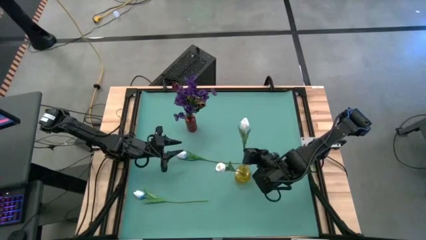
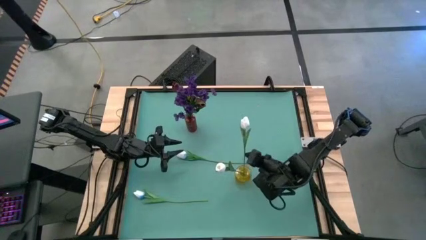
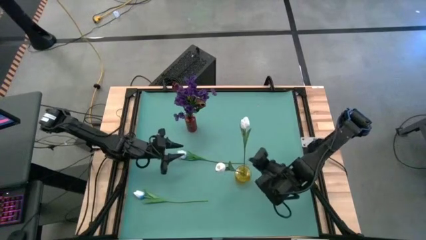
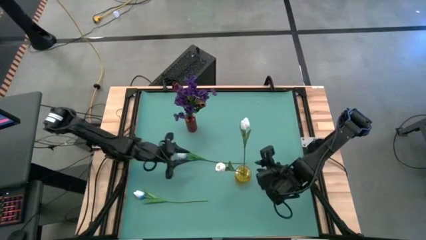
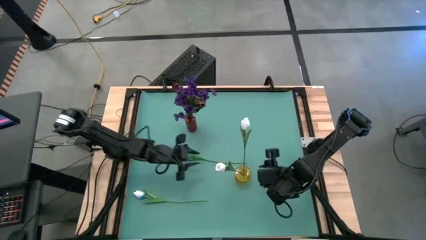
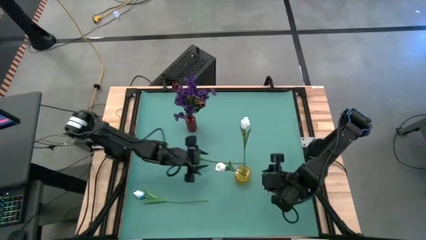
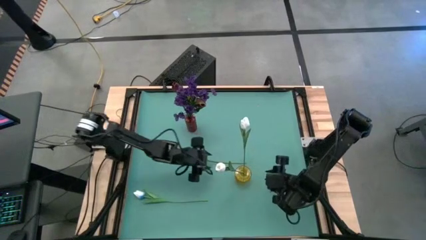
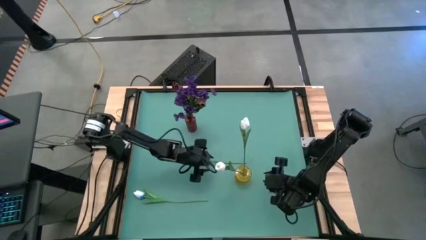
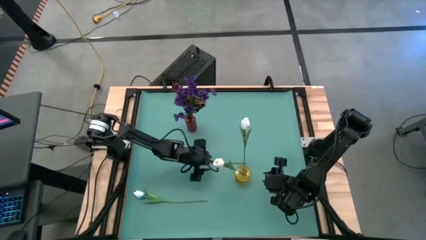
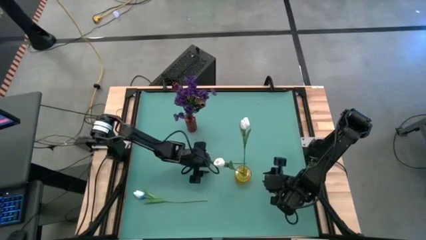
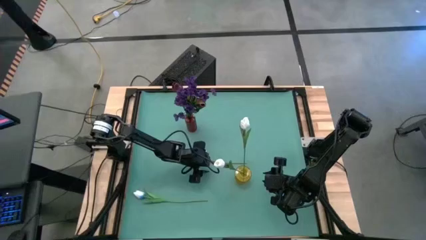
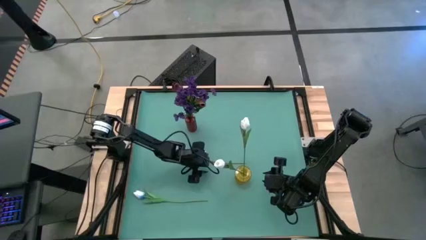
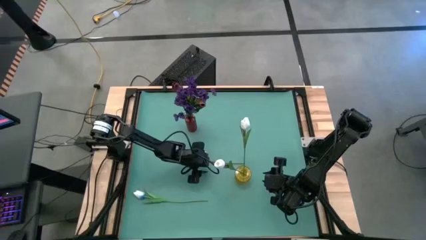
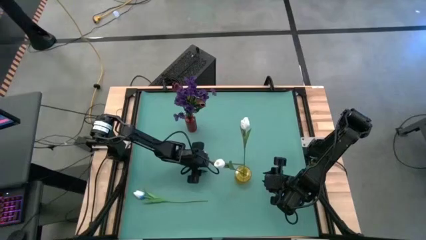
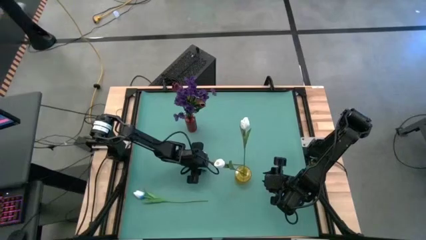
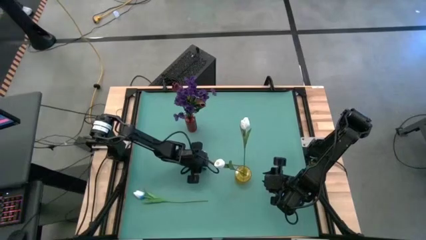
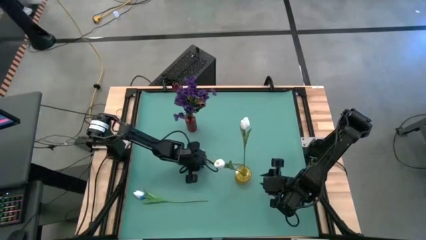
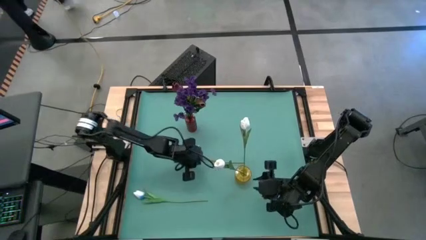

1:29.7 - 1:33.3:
Task: Sort flowers into vase by color
Put the top white-blue flower into the yellow flower vase

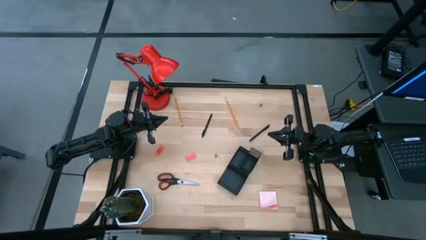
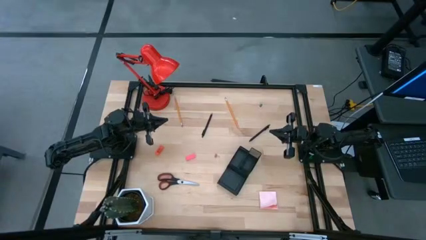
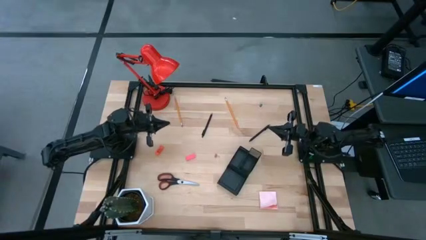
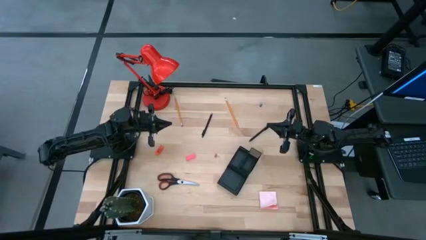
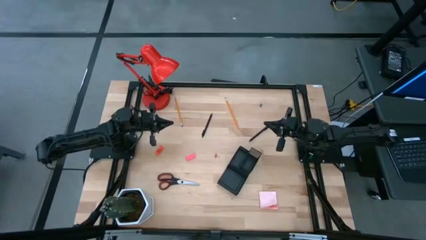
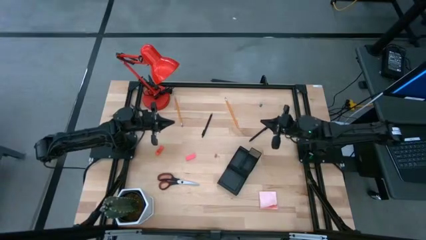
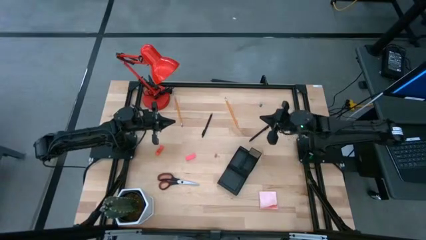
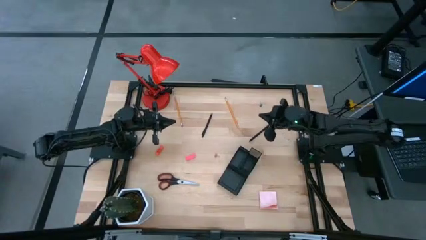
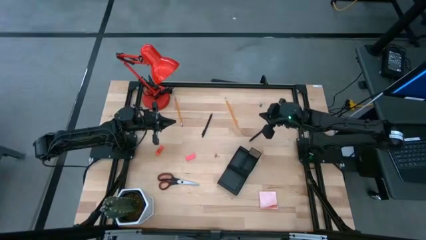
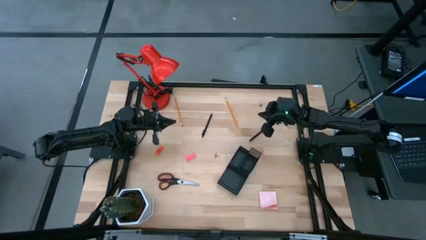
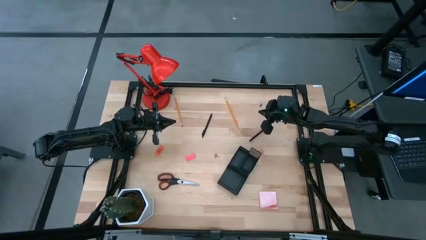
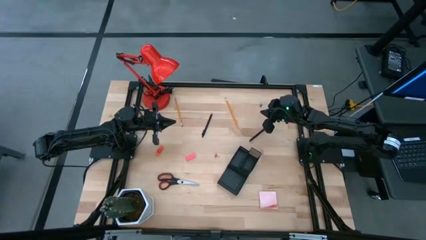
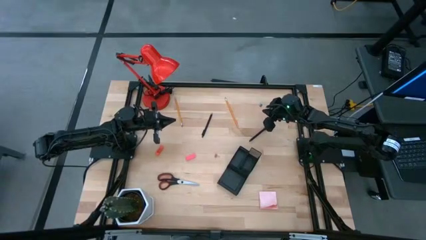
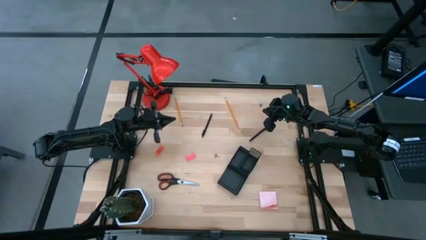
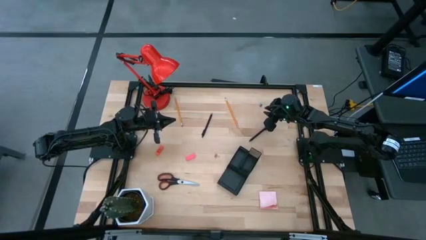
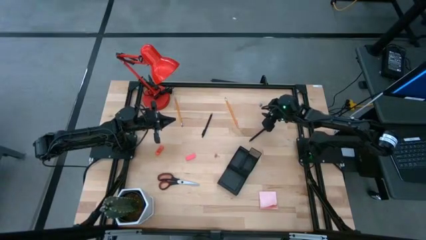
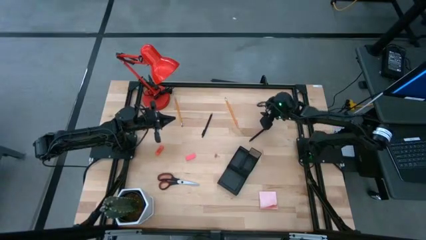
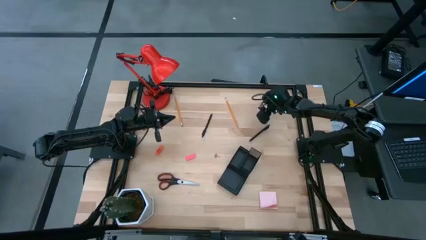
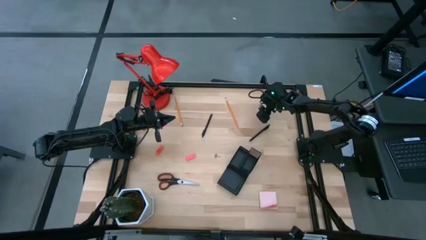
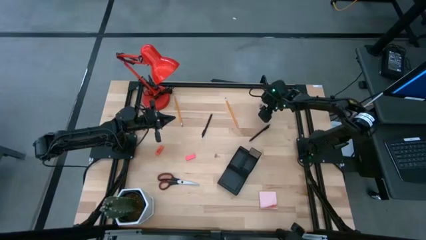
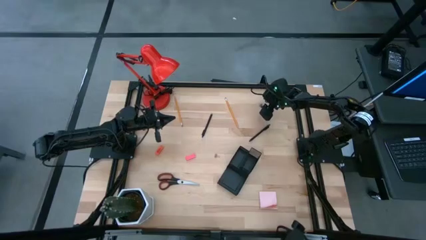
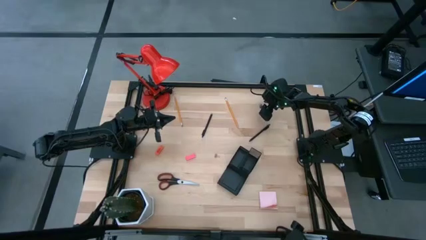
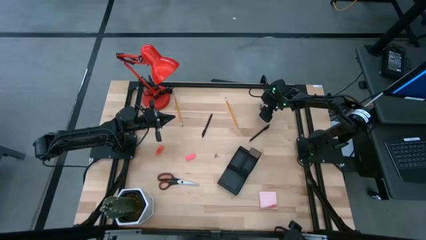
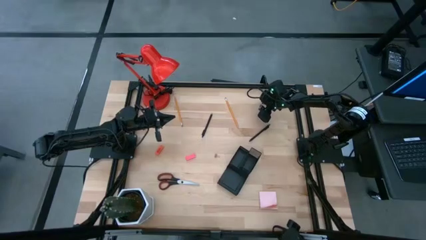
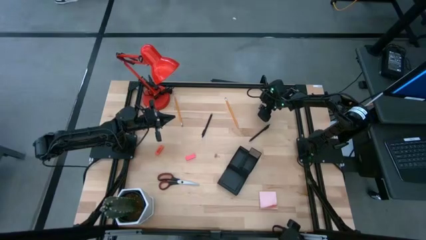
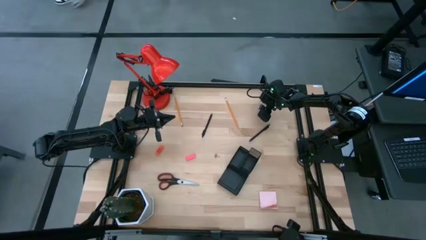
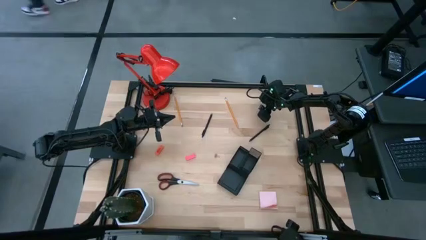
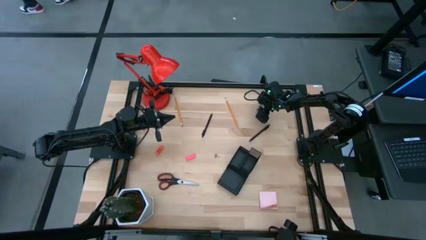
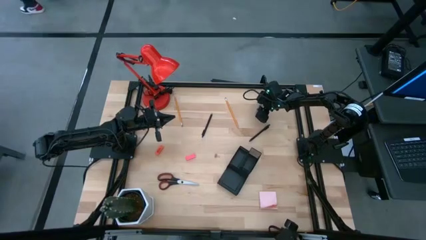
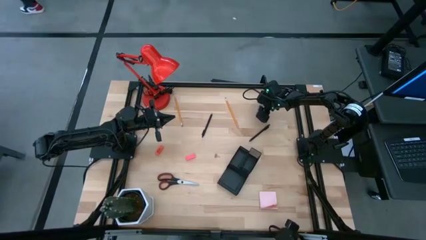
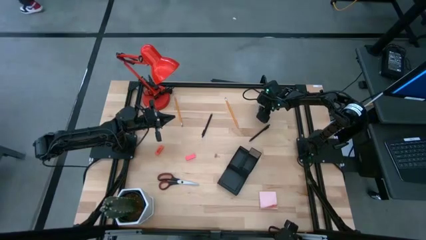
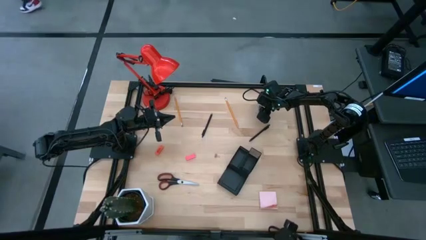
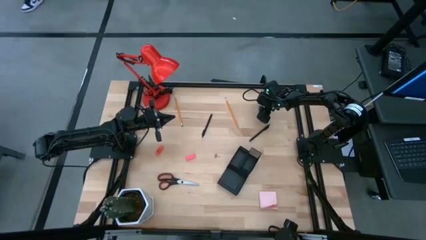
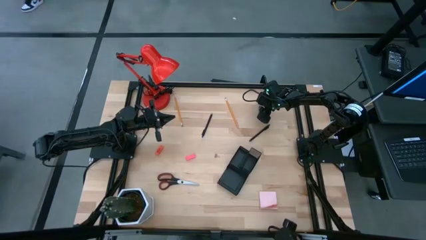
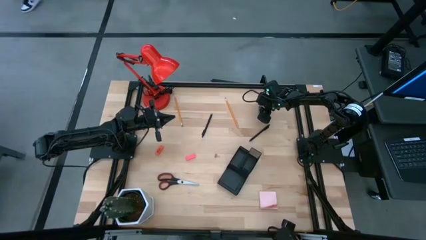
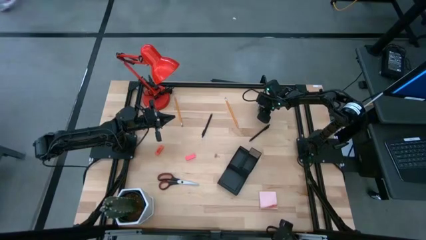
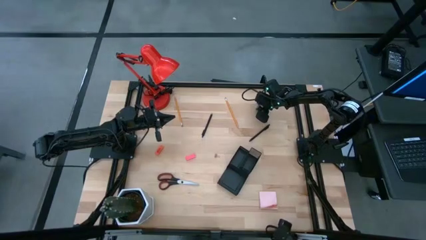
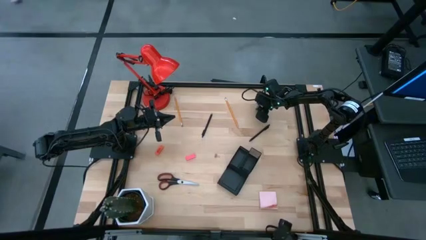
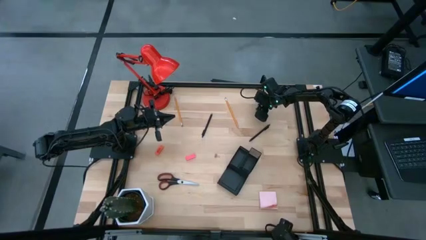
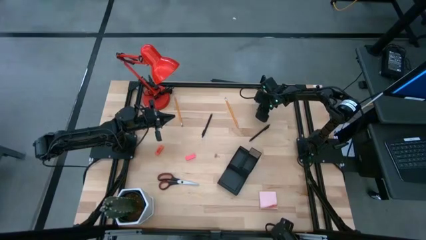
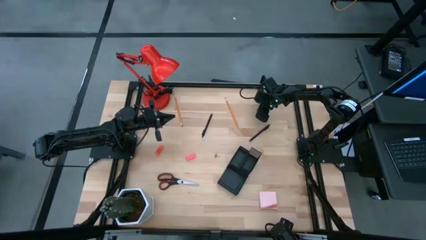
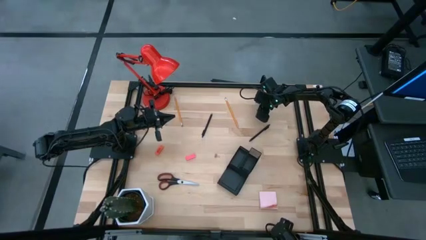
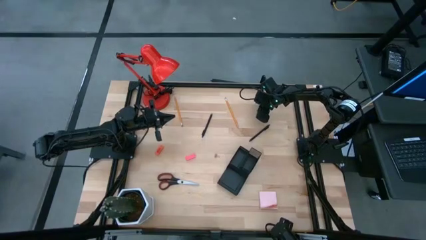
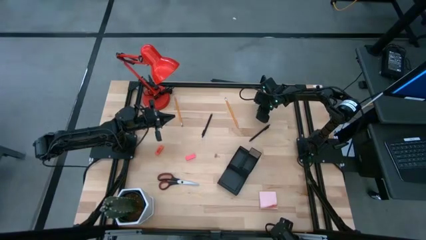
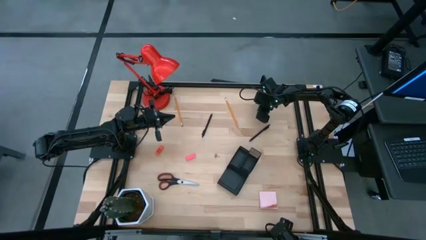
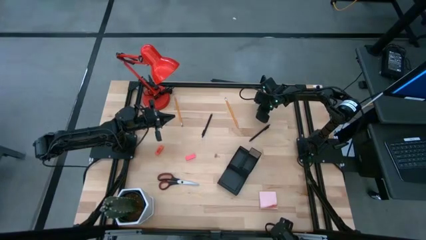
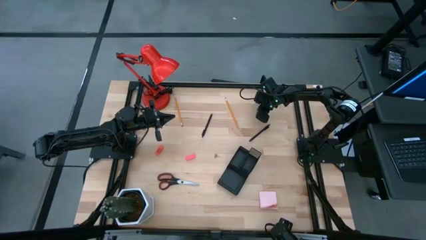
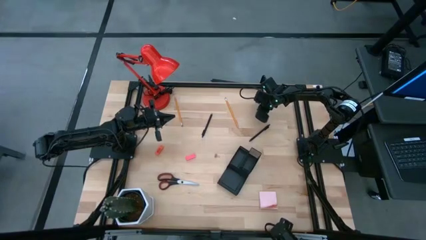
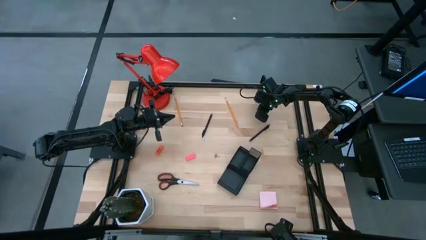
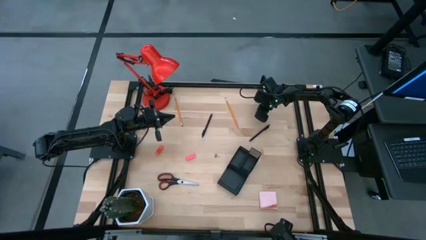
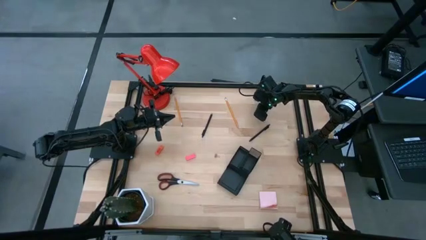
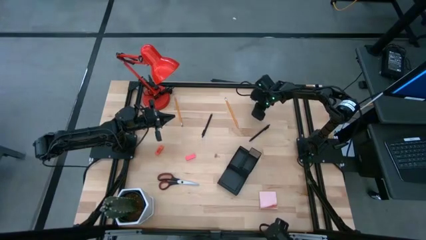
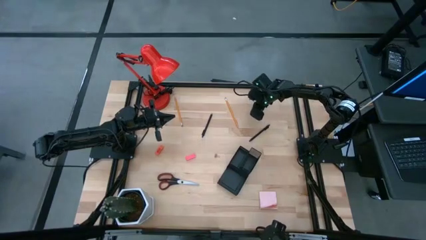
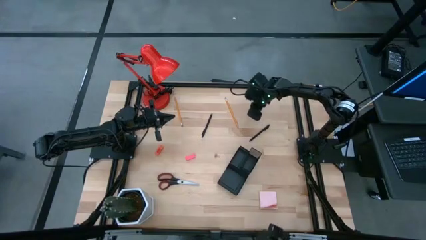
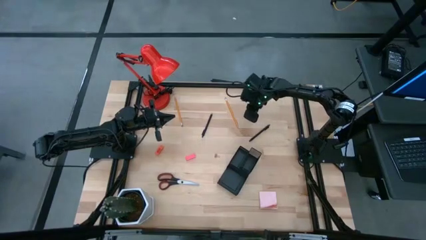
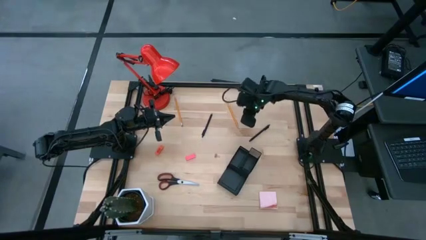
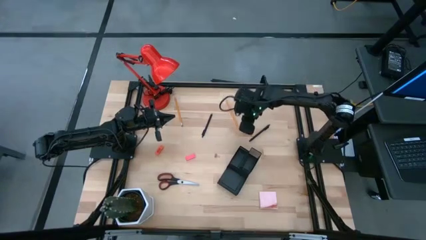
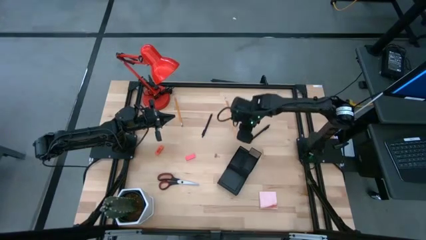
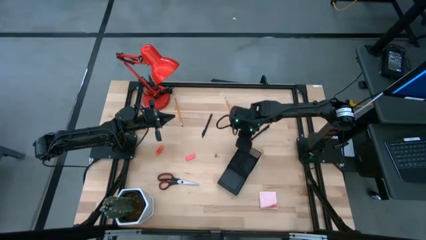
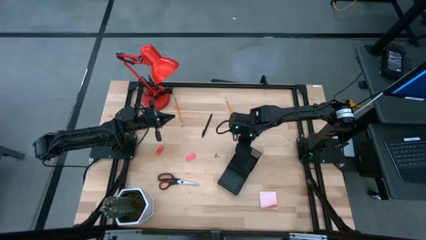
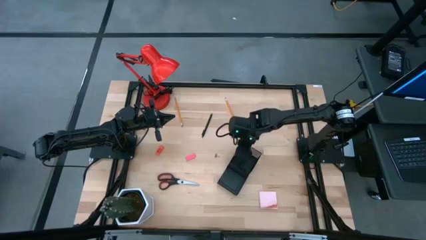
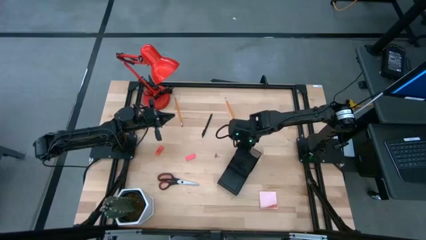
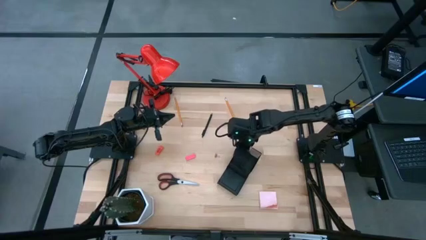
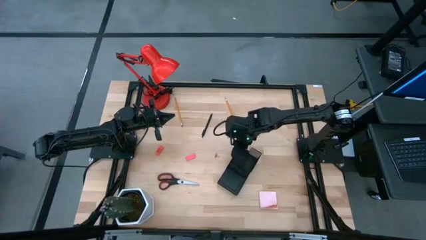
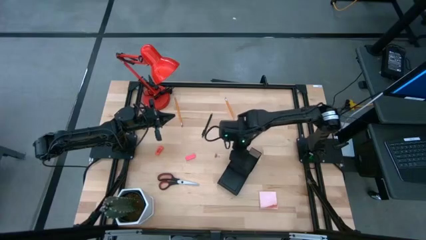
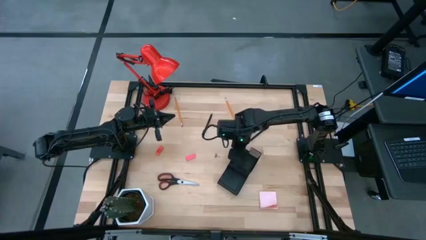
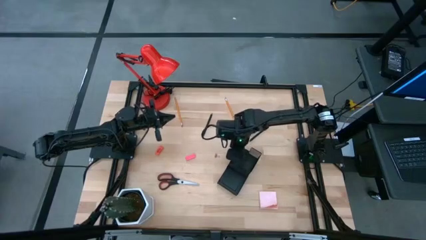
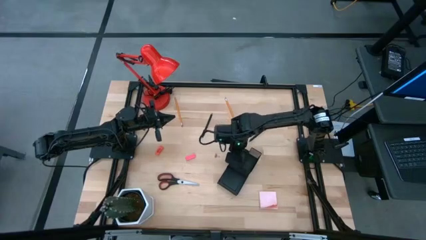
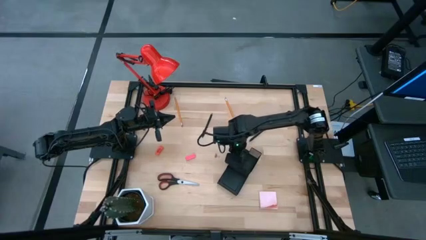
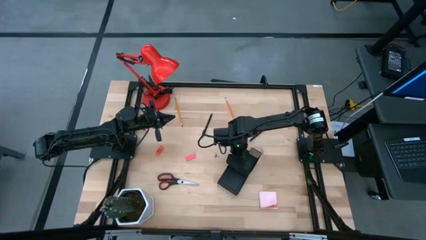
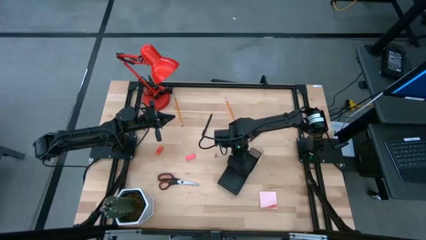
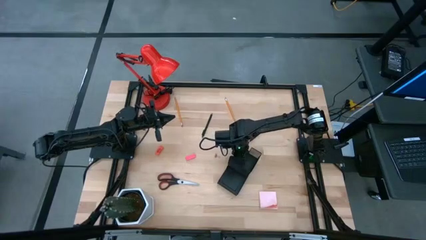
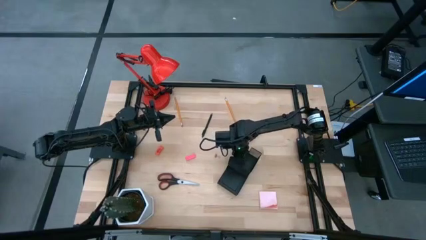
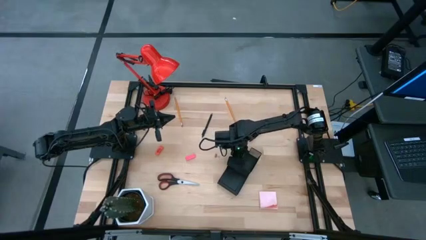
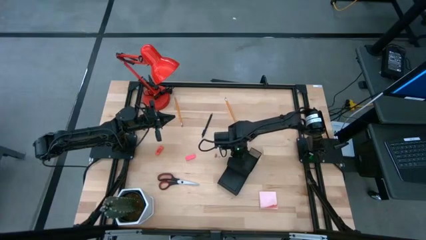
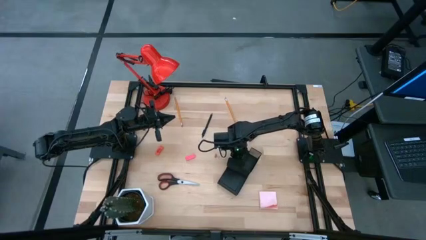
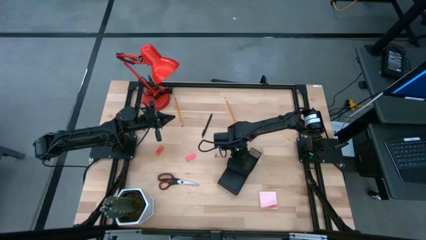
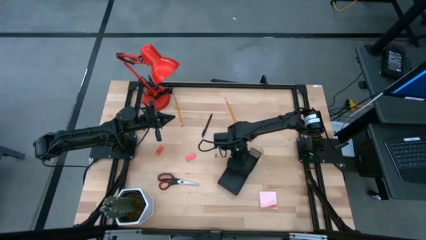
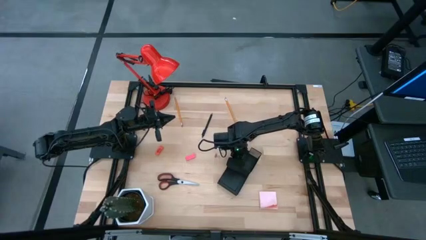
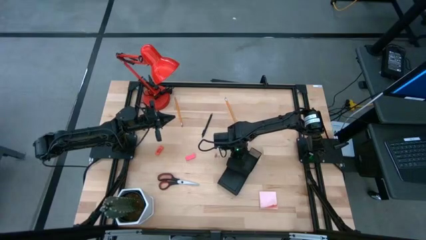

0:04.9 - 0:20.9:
Task: Pick and place office supplies into organizer
Put the blue binder clip into the desk organizer
